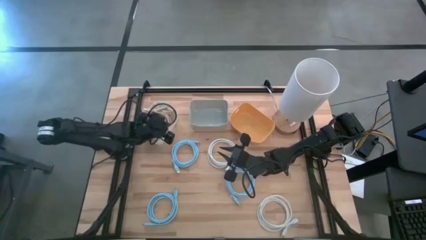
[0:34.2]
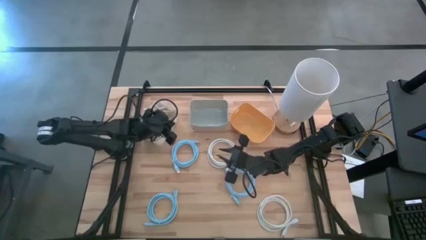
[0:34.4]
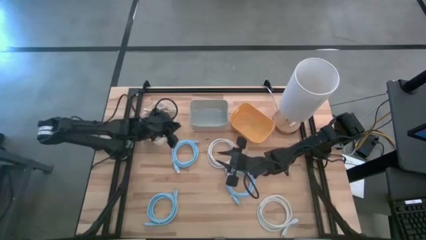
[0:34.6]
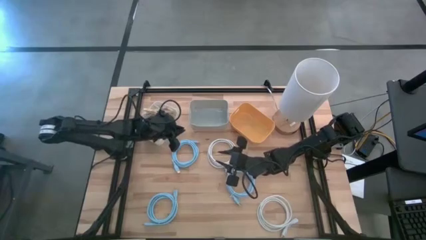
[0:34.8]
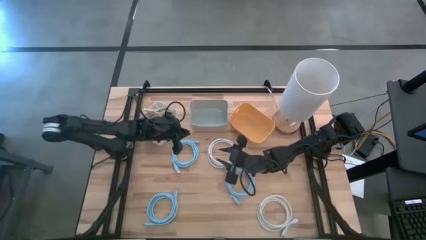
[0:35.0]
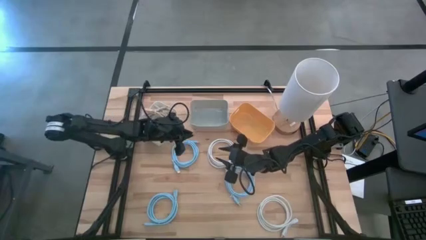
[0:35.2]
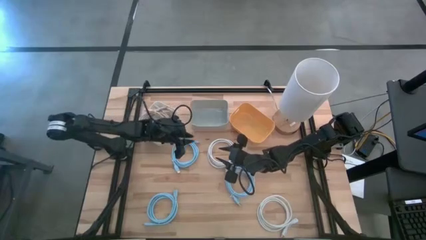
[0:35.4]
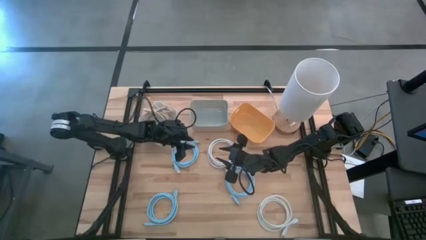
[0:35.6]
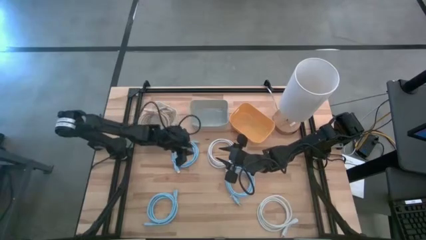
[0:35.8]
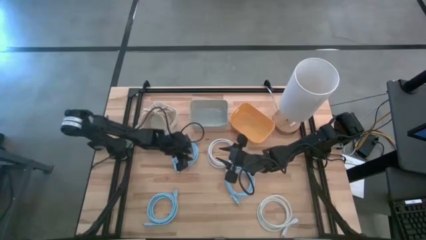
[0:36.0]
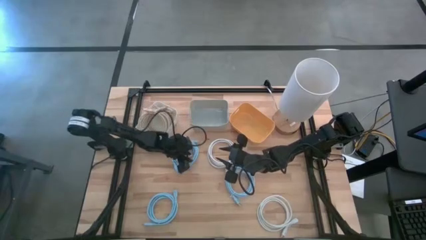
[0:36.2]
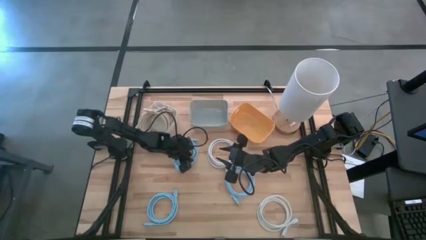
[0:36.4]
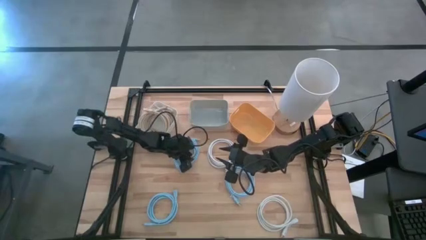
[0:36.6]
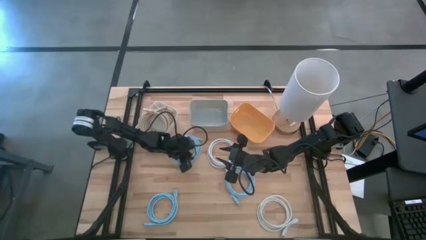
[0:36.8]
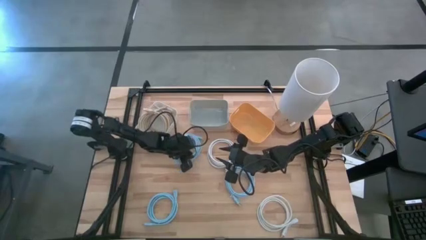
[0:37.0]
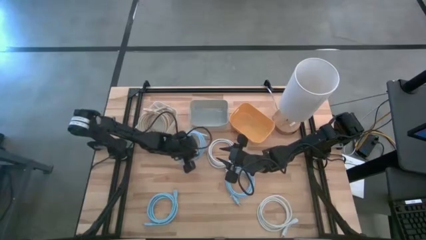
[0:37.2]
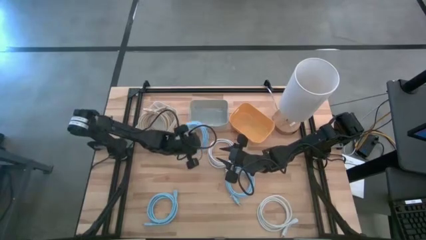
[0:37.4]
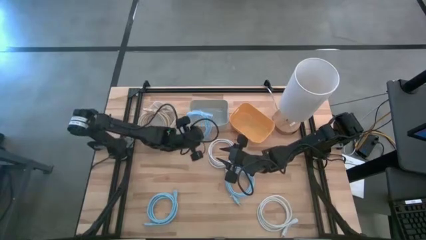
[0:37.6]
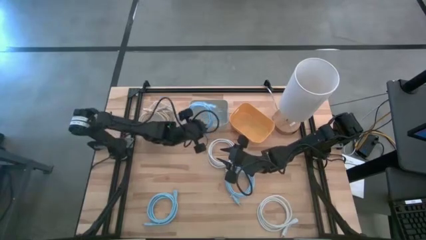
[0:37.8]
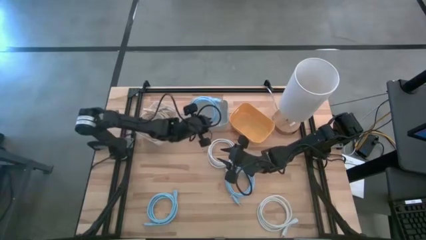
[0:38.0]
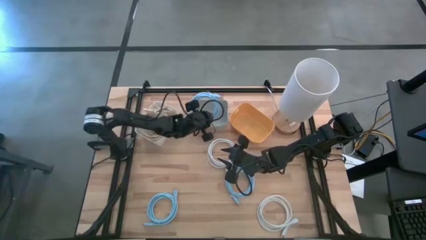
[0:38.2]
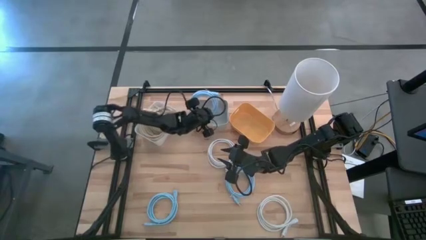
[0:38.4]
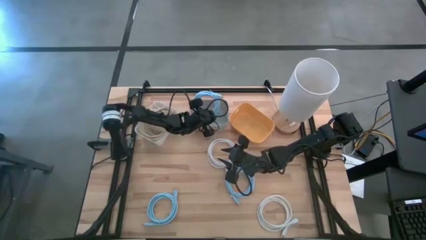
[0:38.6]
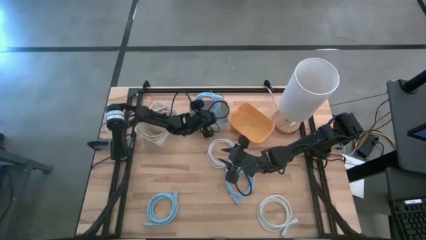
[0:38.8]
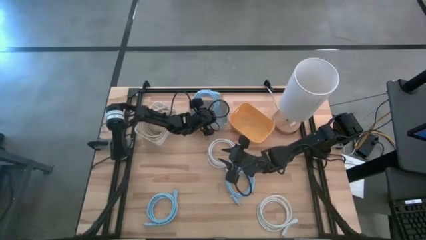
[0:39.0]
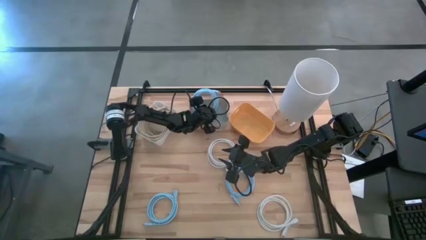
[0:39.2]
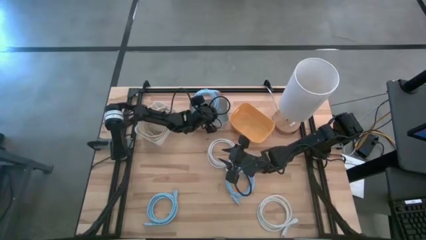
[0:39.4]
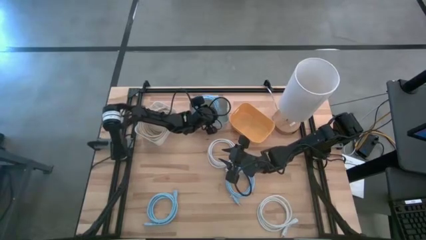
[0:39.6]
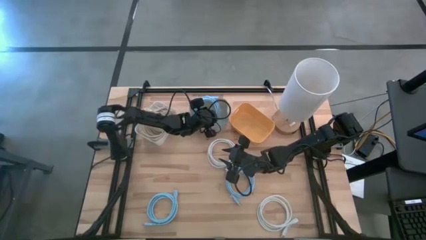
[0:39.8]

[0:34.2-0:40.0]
Task: Sort HDMI cables
Put the top left blue HDMI cable into the gray bin

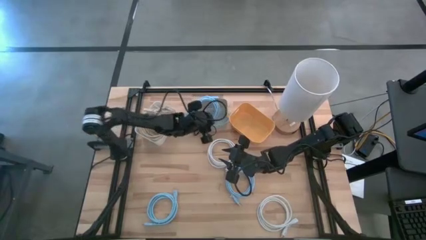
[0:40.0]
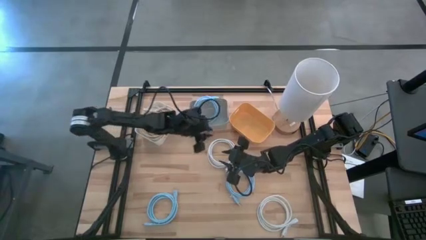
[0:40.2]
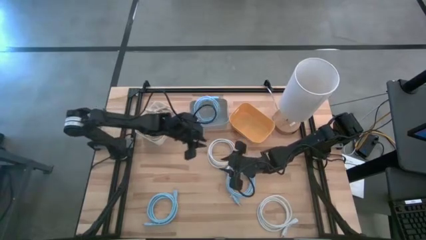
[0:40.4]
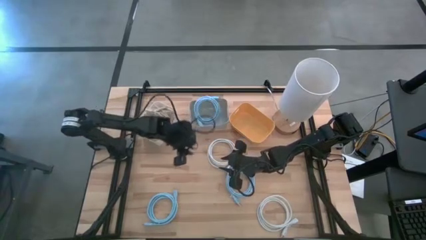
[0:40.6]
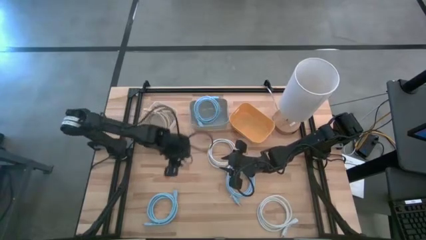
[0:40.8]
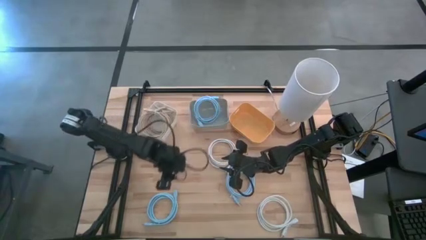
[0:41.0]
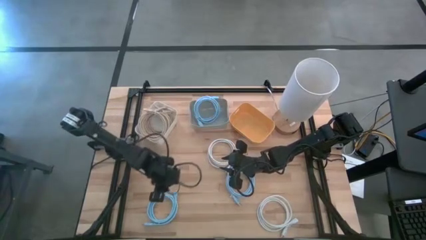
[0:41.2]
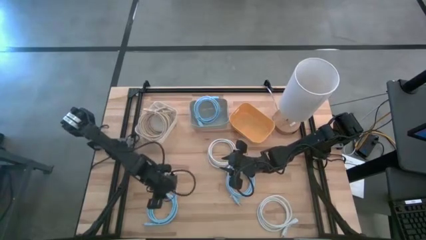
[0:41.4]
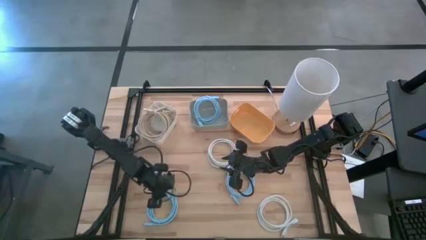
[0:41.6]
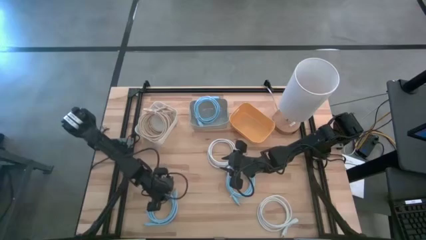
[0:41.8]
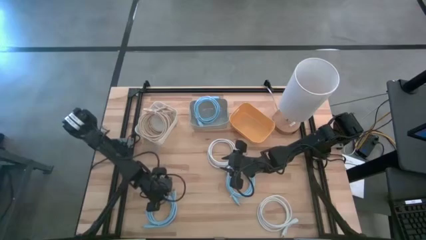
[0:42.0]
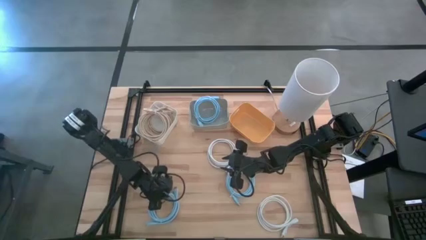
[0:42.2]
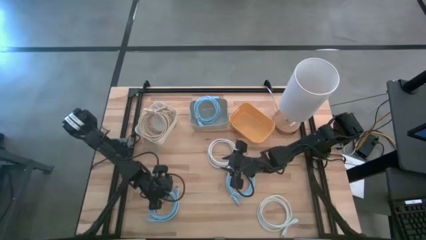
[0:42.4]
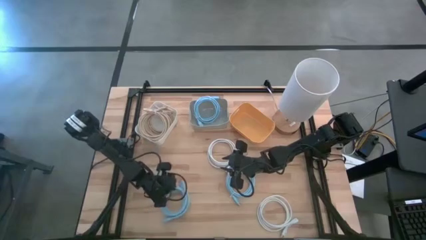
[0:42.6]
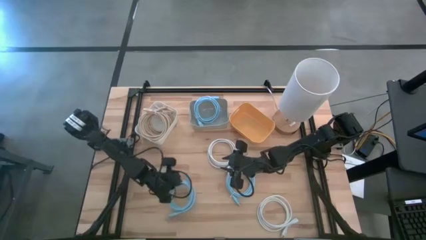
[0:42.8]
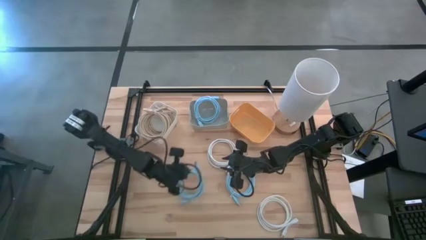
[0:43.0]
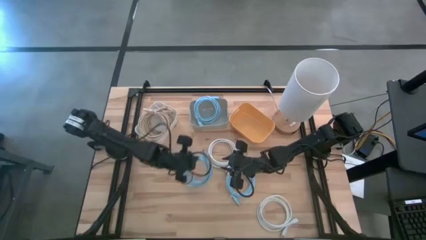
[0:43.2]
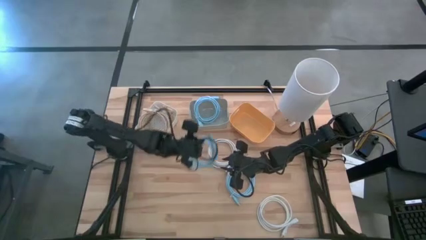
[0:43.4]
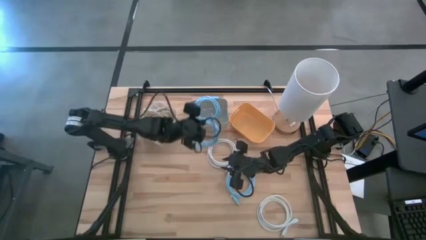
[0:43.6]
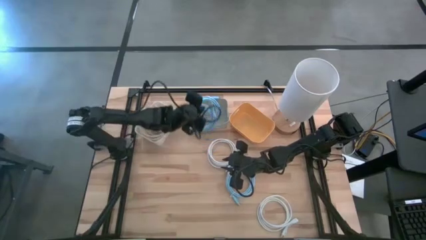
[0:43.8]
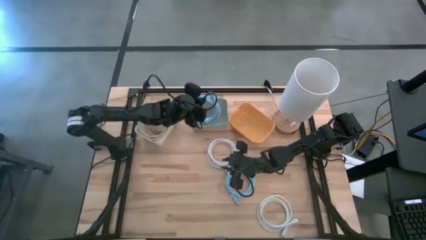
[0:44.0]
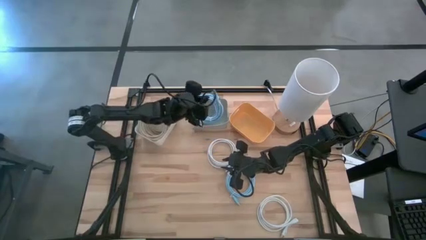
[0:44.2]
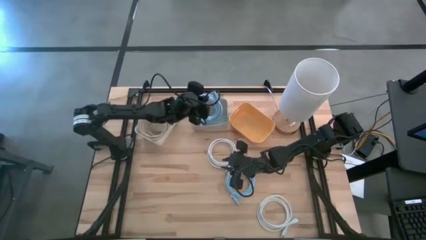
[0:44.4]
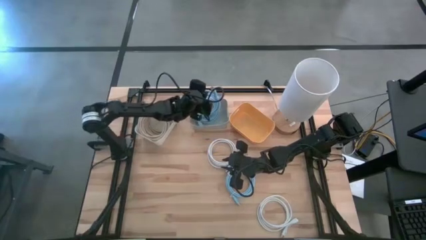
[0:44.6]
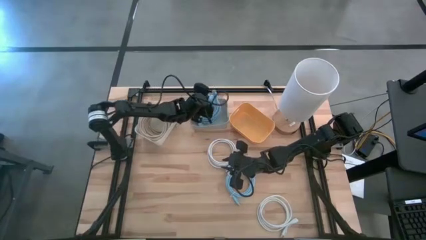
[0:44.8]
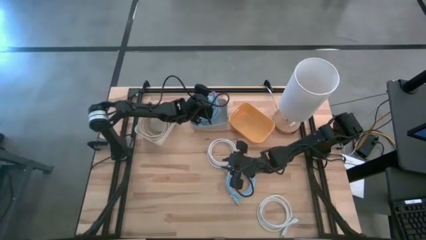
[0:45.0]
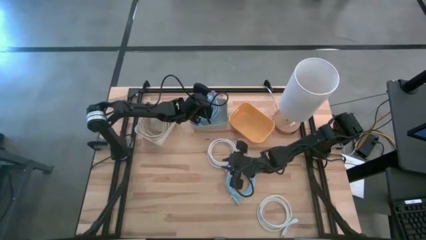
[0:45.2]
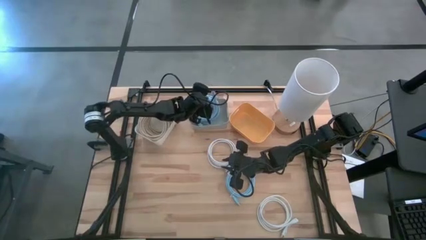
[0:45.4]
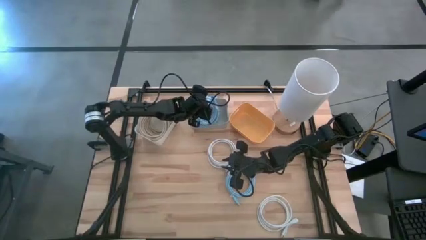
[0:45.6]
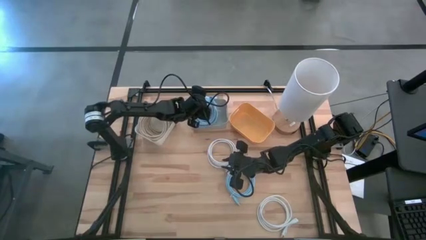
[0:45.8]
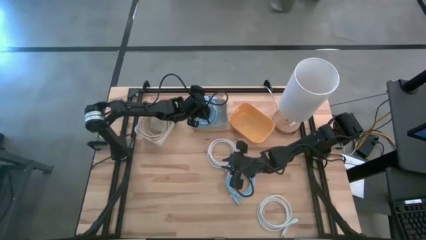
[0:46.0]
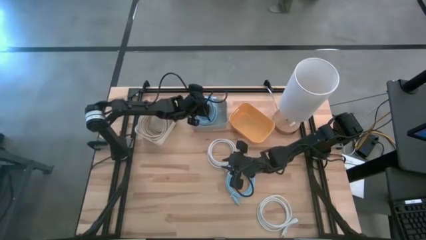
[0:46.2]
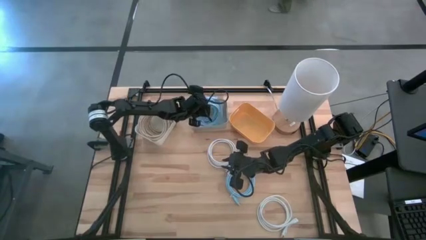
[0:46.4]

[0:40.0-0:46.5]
Put the left blue HDMI cable into the gray bin

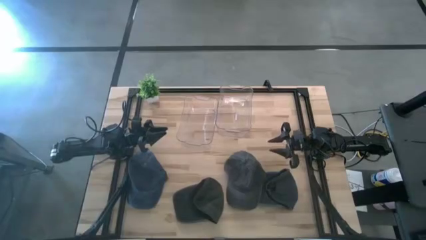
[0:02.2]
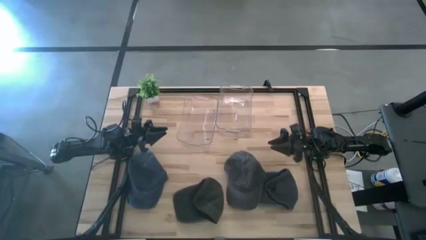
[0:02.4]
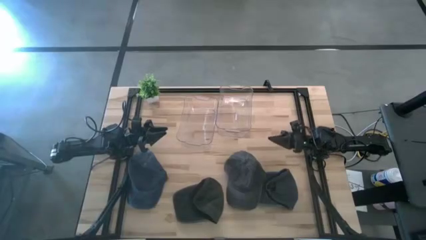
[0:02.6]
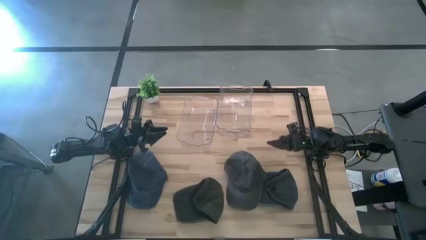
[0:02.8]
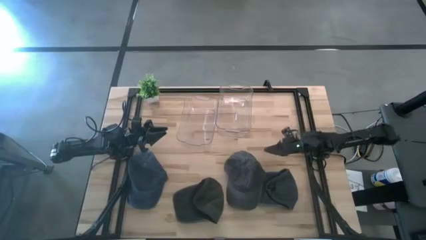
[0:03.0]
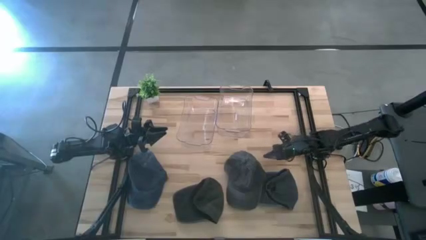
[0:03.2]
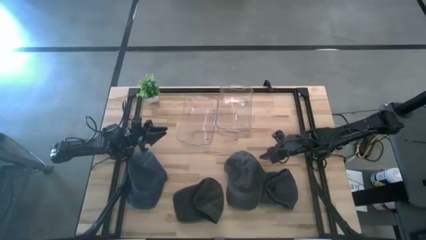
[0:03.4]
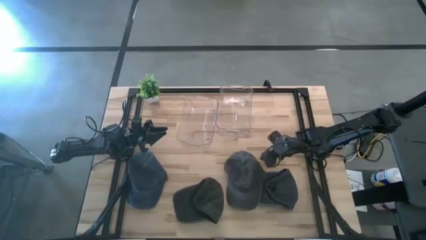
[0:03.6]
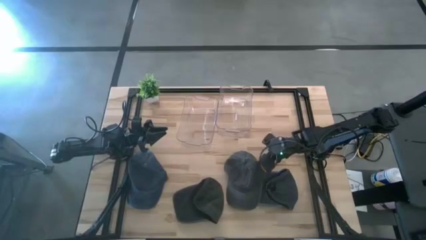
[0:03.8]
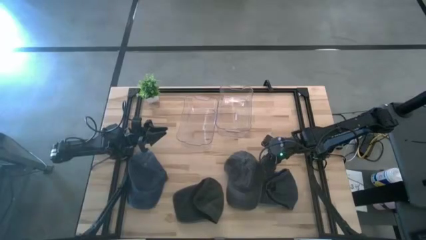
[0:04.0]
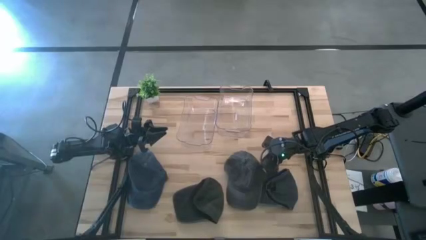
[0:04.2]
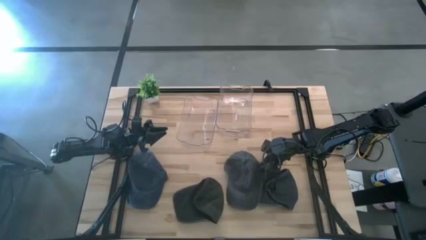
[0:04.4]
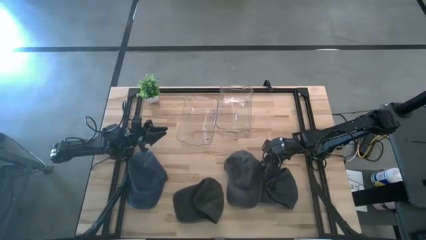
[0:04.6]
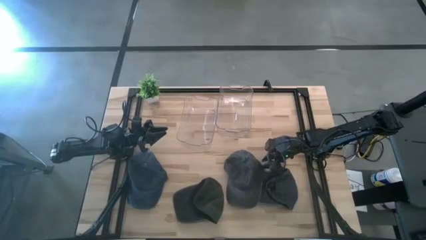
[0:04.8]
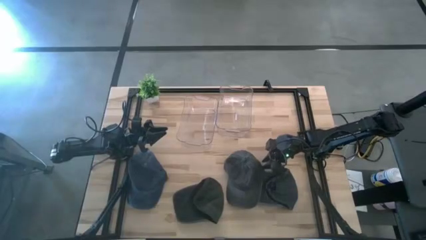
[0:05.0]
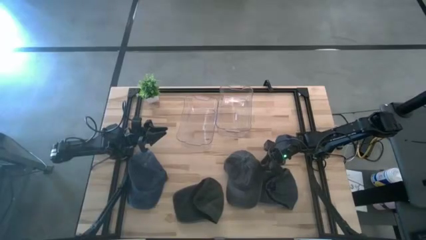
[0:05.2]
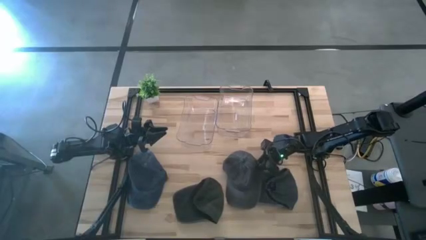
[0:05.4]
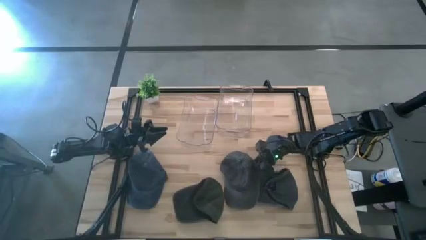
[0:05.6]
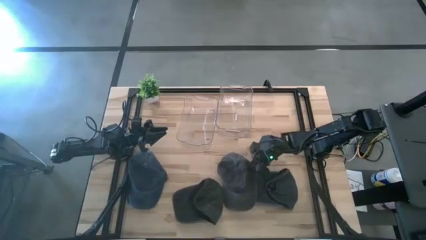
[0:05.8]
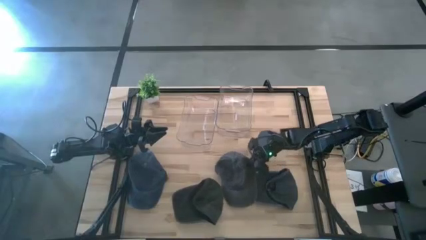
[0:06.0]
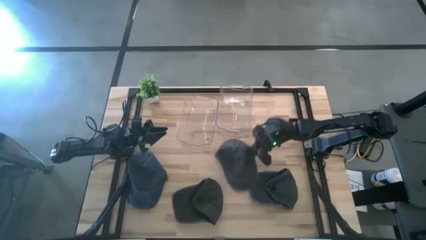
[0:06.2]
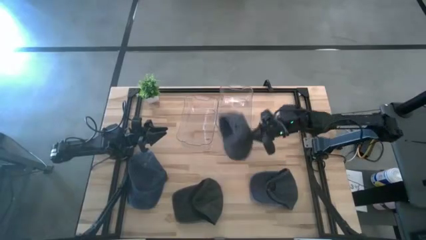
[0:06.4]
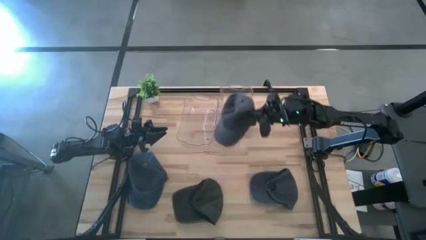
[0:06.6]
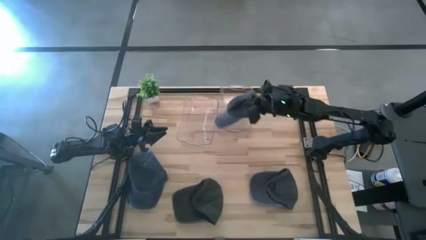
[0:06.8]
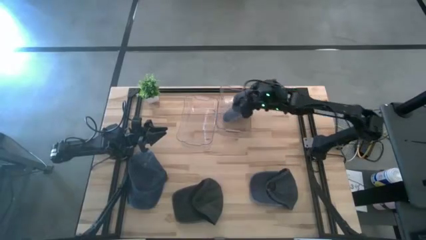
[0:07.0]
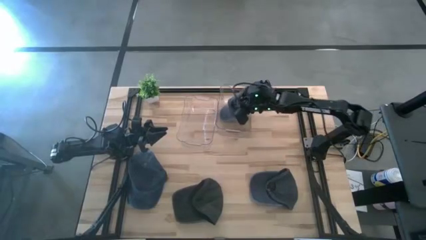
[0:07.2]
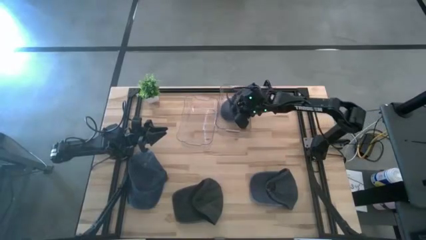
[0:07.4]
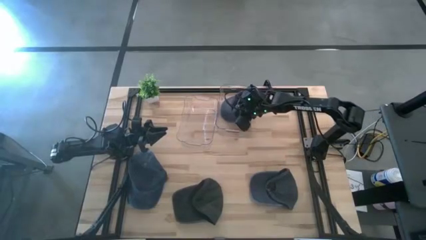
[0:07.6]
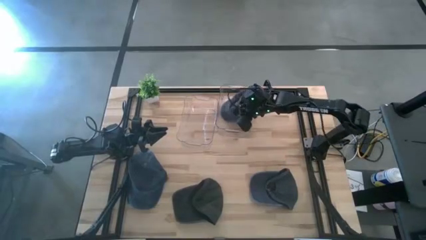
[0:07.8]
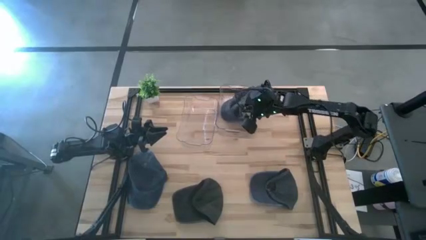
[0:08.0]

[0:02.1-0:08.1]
Task: Pick & Place hat
Put the right black cap into the right transparent bin
